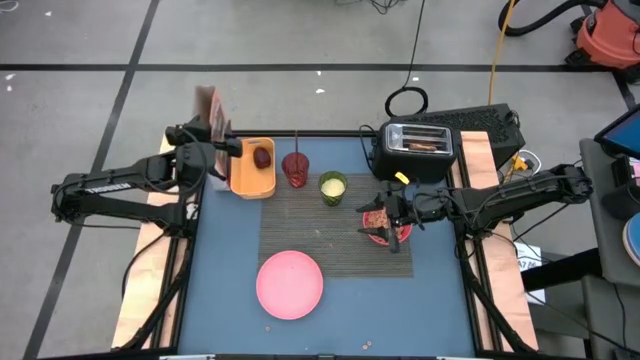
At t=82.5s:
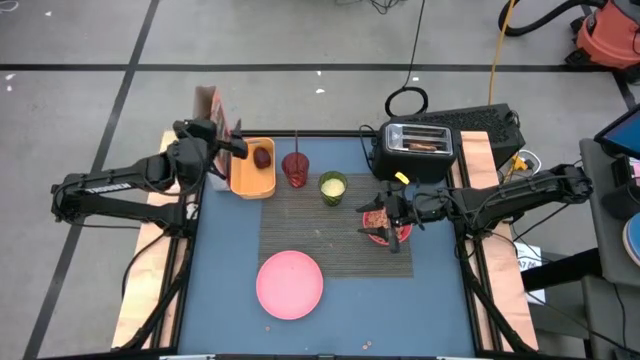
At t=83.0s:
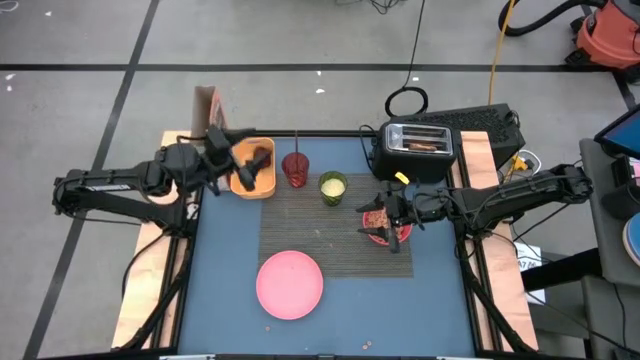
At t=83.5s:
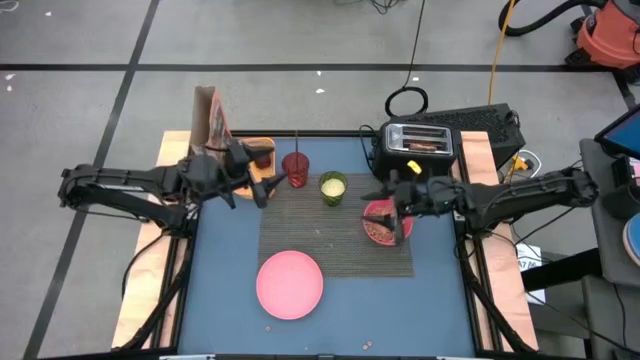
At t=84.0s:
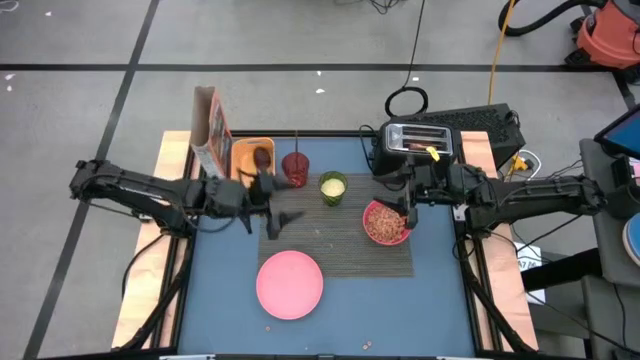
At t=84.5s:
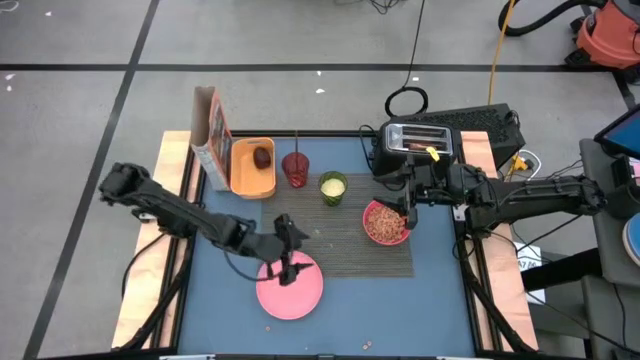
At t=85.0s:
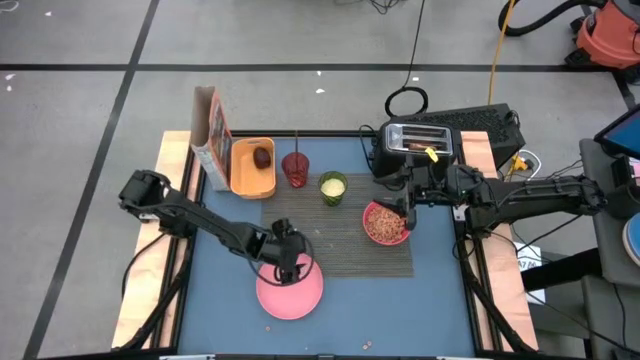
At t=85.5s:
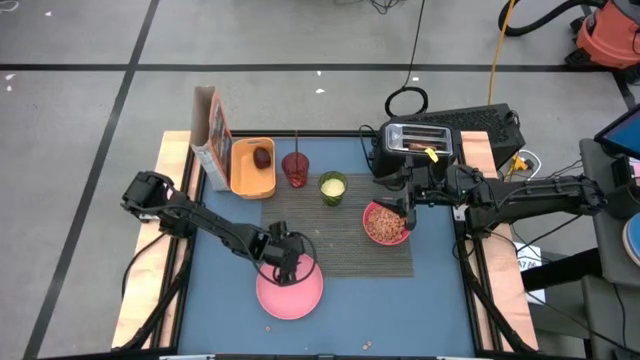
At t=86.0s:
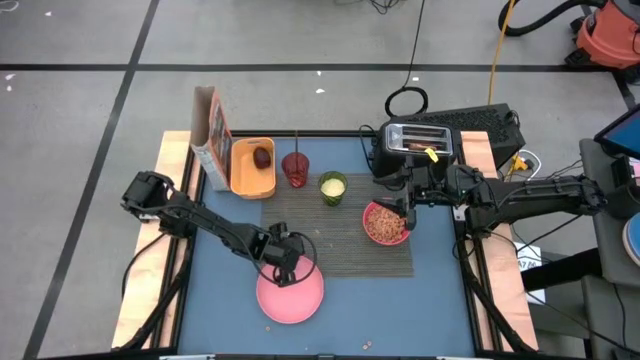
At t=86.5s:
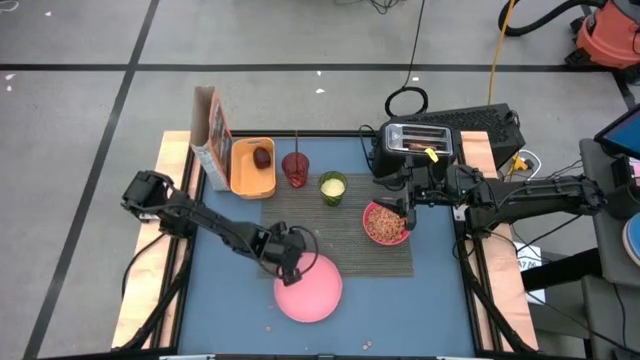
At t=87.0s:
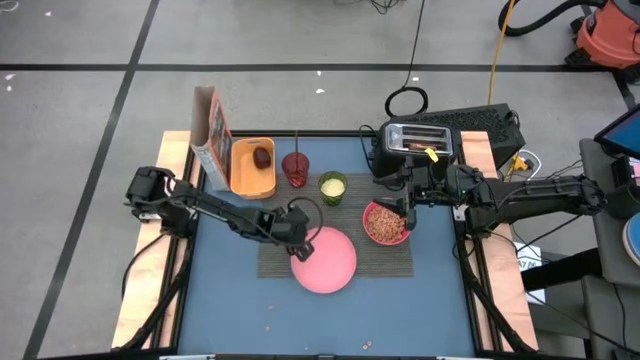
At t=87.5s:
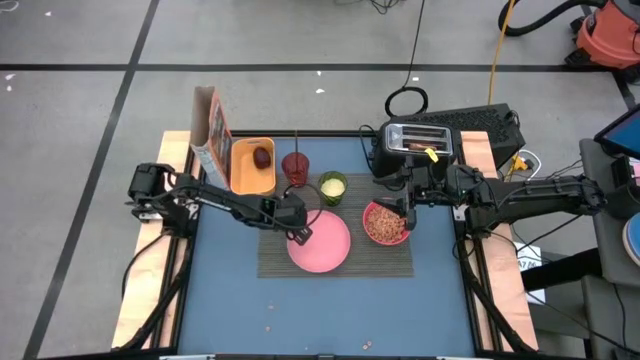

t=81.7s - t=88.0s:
Task: Arrange a breakfast setting
Adjust the light pink plate on the gray table placemat

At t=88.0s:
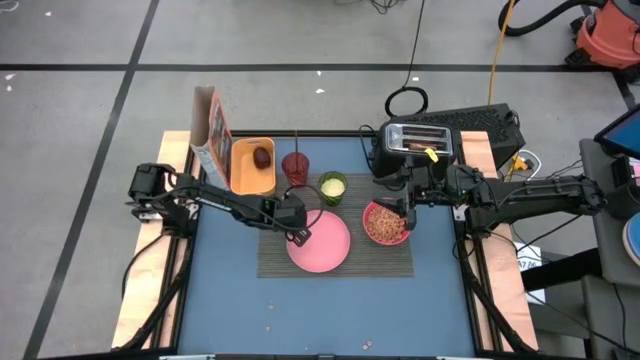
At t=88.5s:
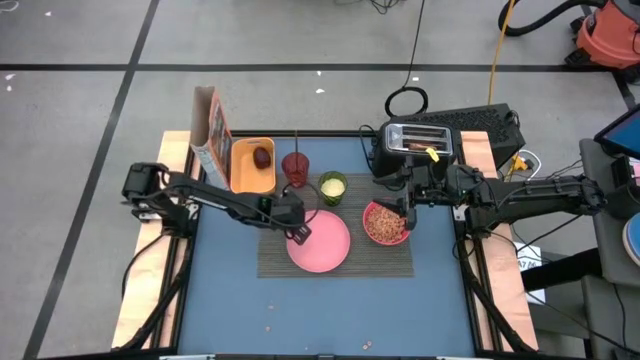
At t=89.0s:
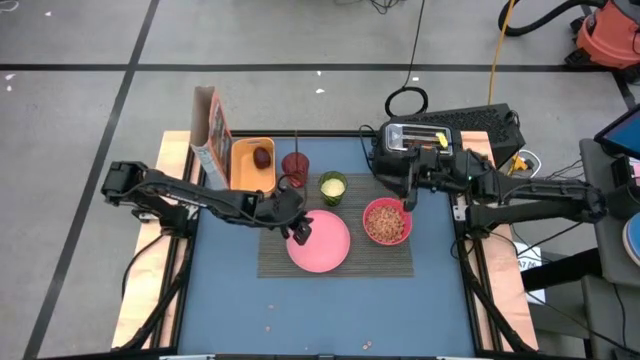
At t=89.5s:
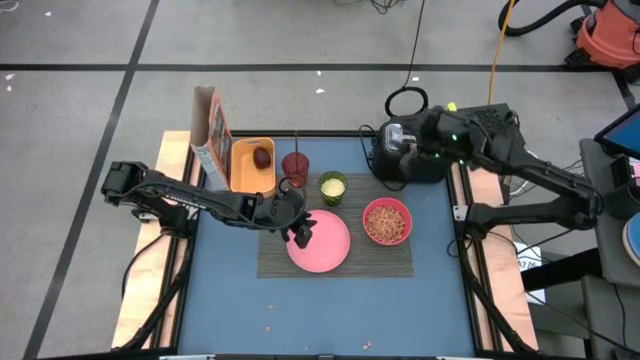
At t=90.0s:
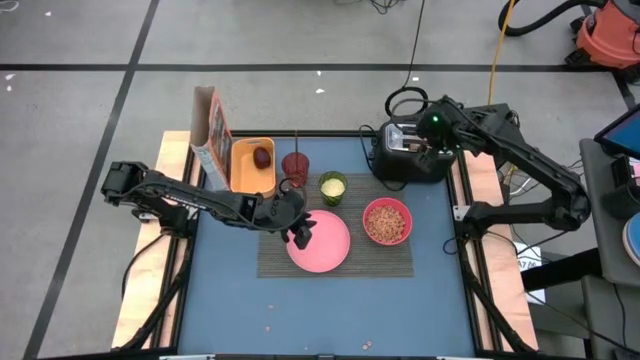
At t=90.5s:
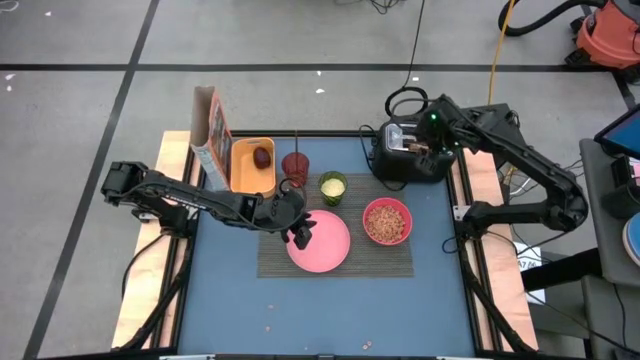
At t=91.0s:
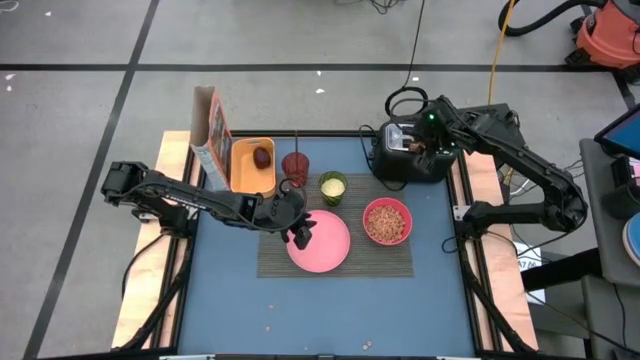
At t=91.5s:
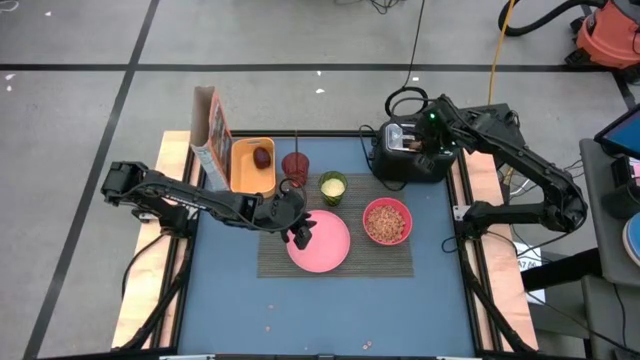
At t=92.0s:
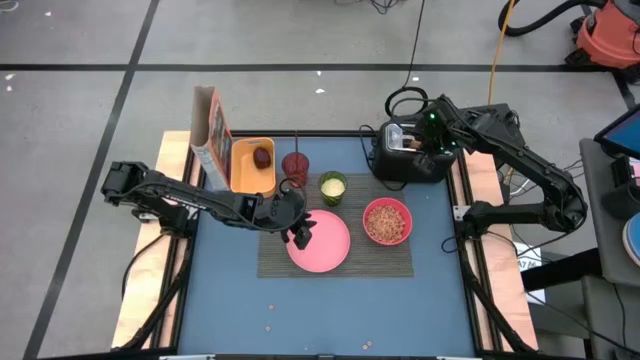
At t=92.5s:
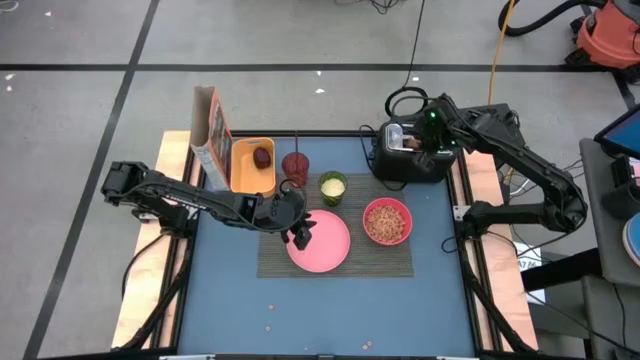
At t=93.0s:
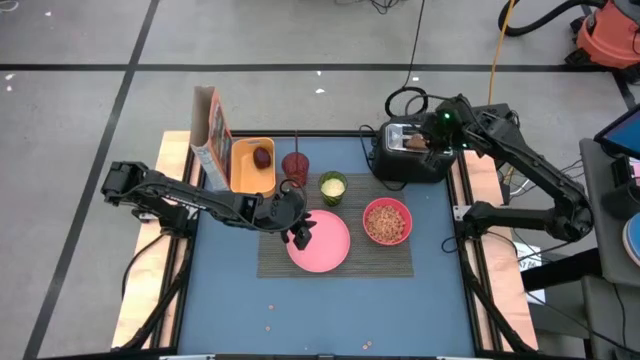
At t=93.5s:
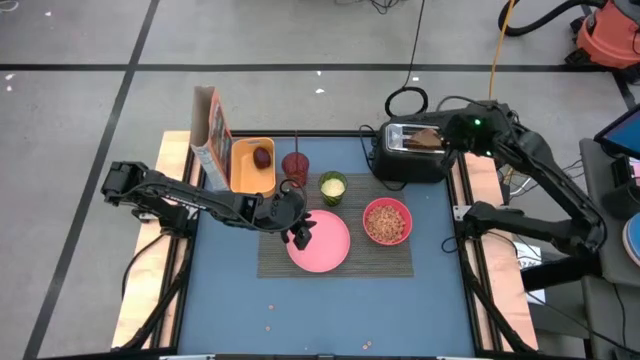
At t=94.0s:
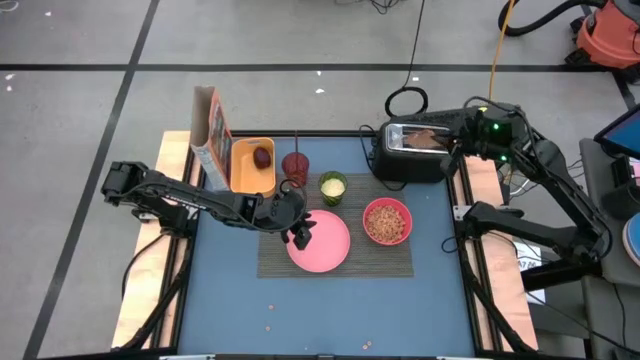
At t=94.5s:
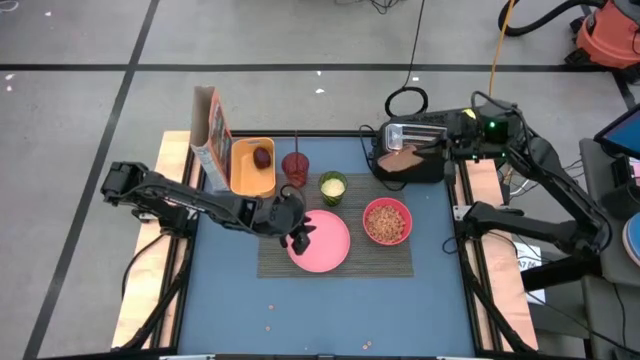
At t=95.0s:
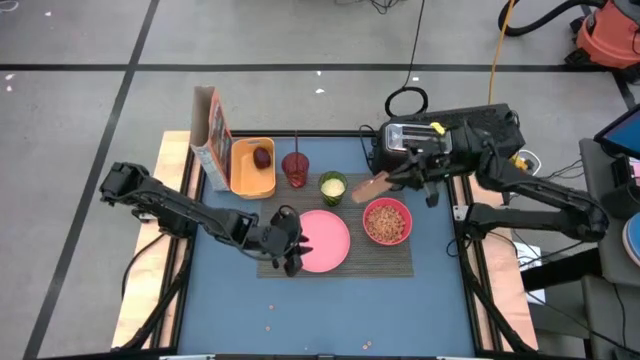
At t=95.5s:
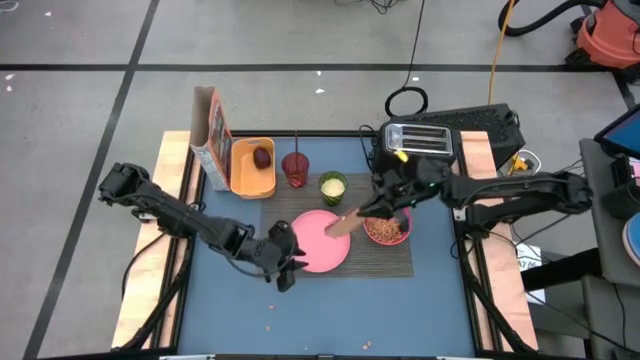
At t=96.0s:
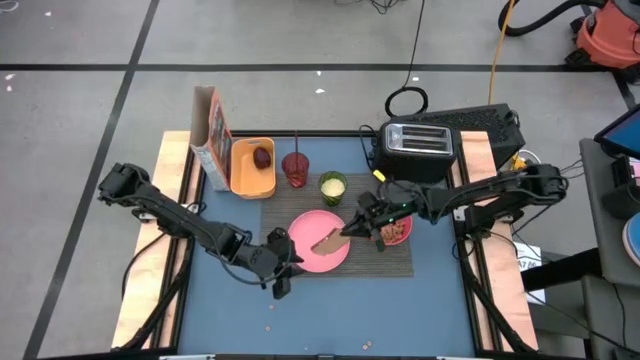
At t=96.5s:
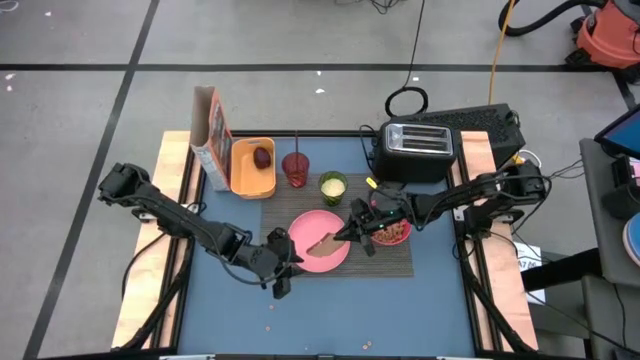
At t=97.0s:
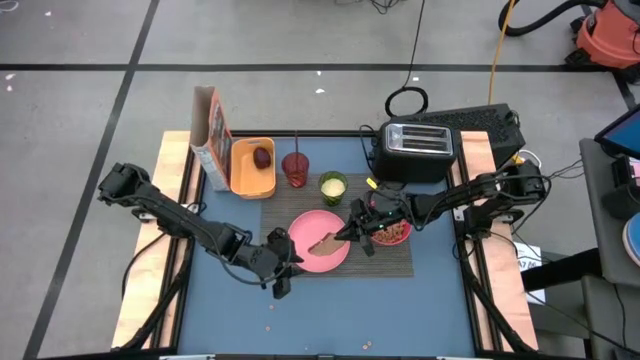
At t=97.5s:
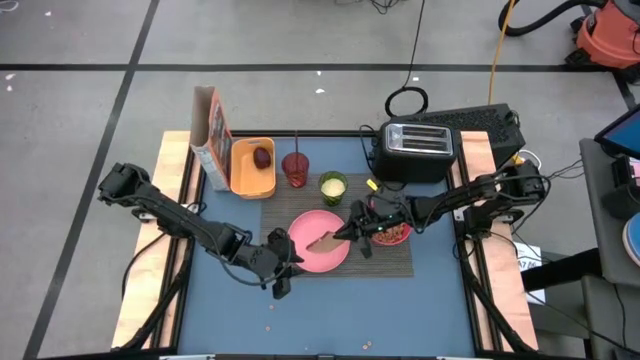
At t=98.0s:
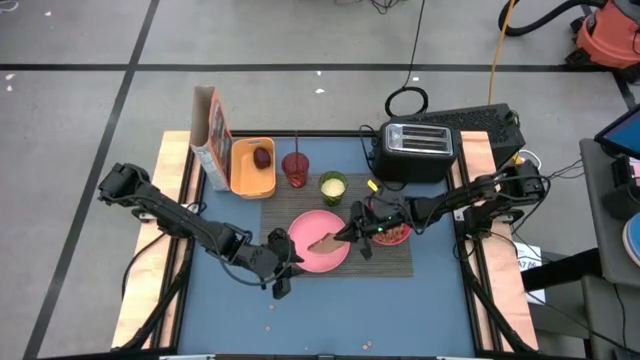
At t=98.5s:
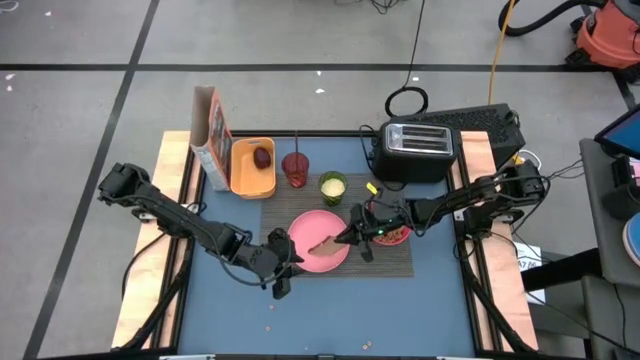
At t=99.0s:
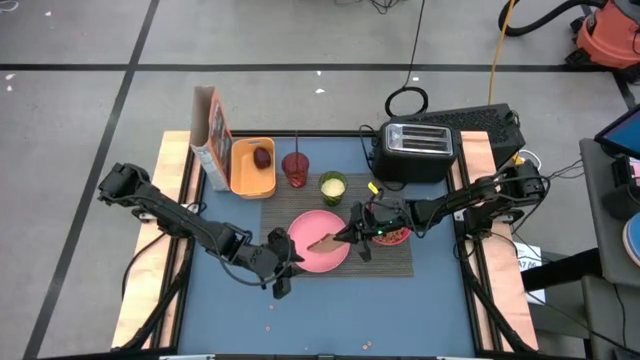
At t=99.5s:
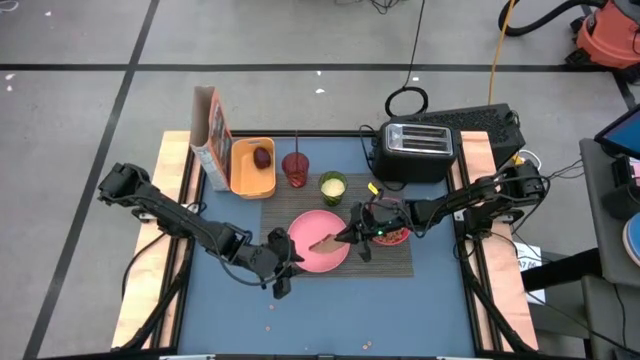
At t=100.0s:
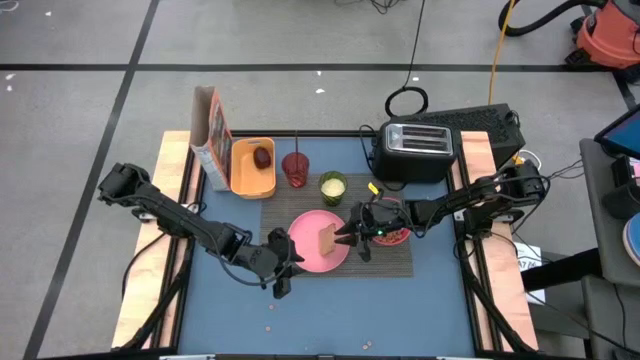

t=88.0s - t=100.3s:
Put the toasted bread on the pink plate

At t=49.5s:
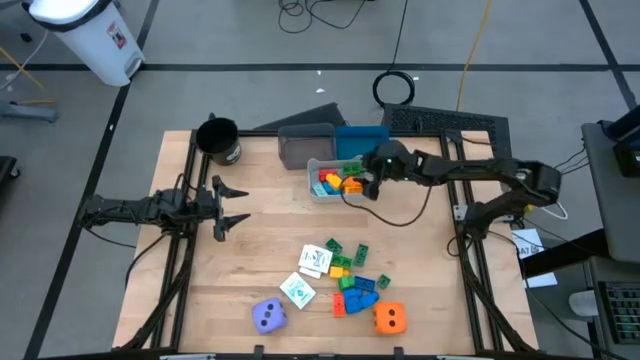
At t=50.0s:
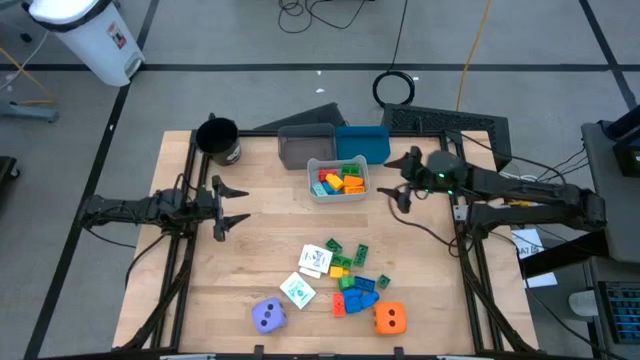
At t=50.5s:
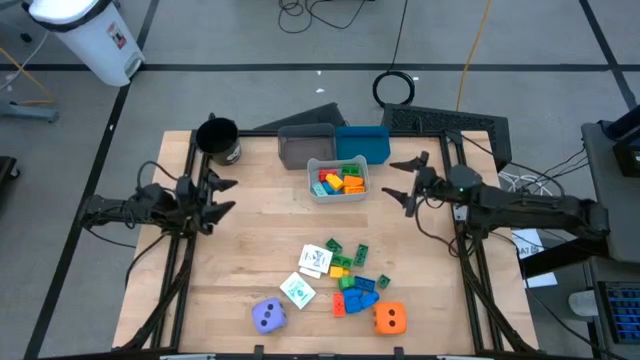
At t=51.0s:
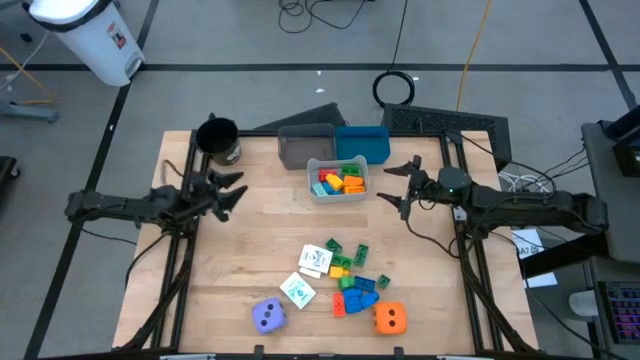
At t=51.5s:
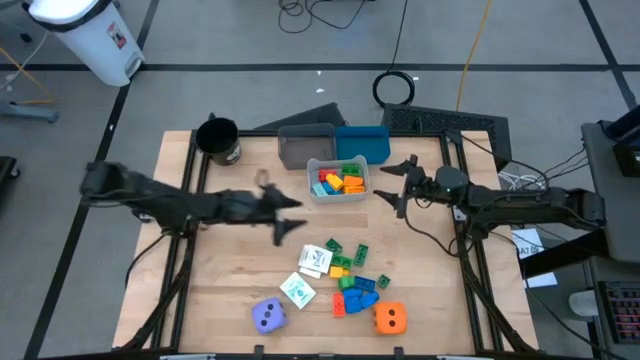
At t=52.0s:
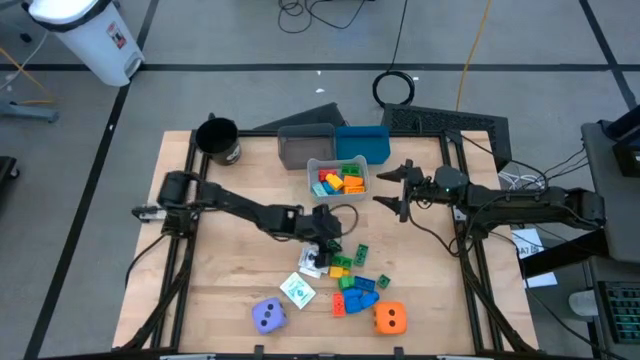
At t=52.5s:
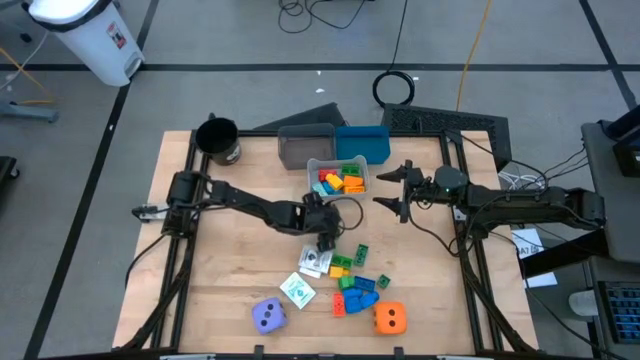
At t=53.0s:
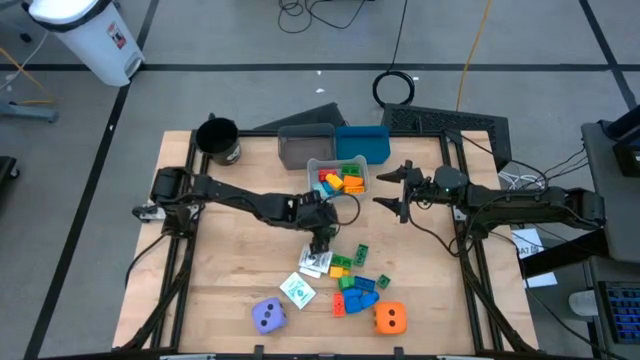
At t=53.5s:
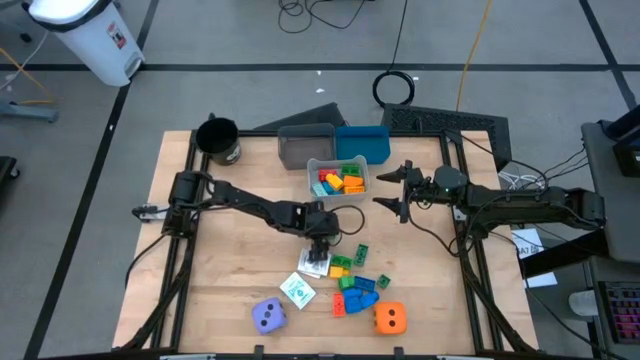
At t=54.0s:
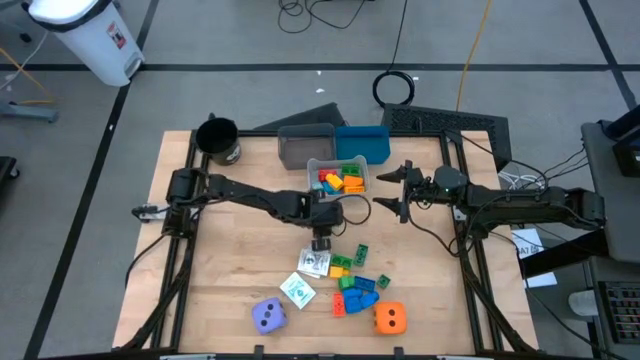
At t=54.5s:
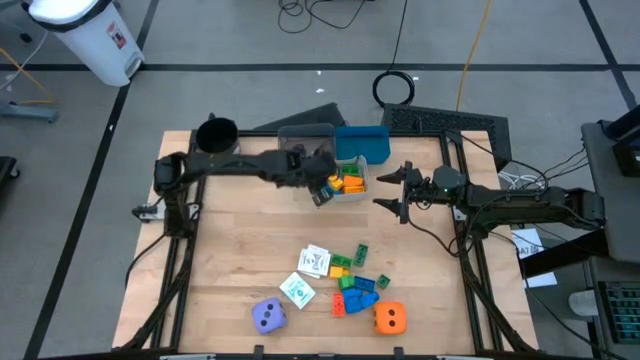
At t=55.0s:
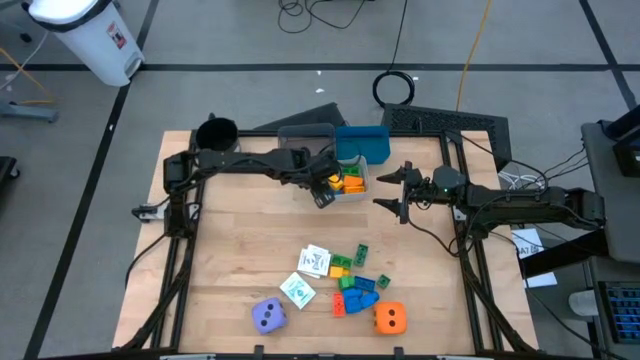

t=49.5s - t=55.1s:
Task: Pick & Place Toys
Put the dark green game piece into the gray bin
